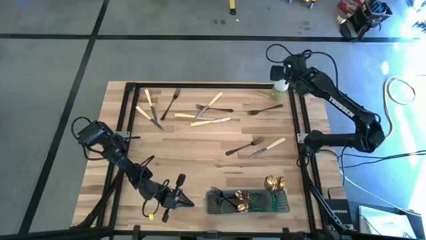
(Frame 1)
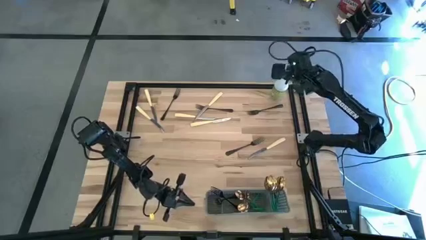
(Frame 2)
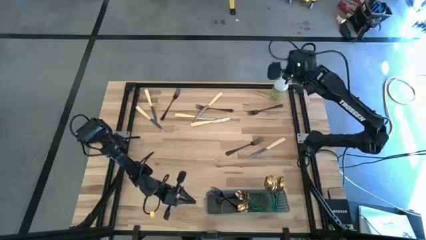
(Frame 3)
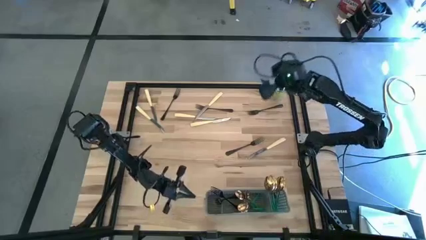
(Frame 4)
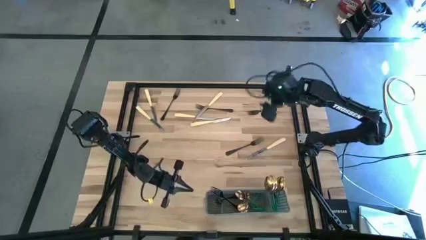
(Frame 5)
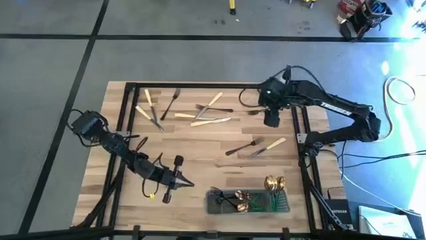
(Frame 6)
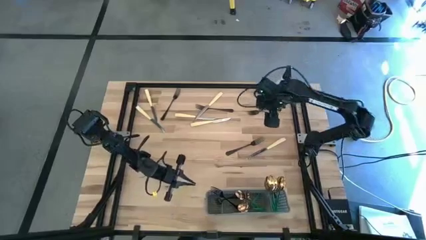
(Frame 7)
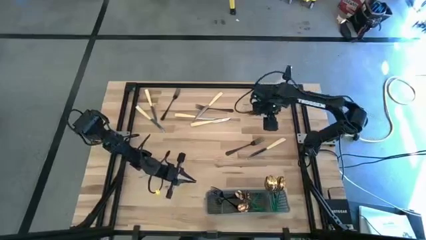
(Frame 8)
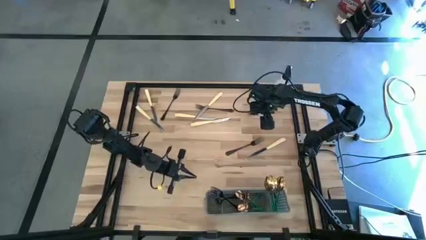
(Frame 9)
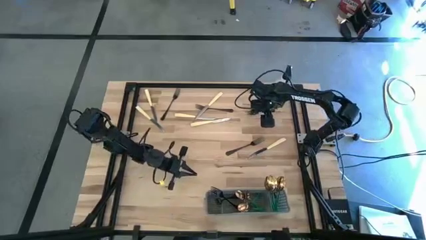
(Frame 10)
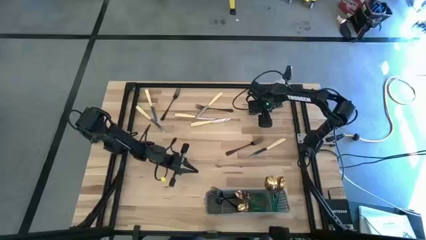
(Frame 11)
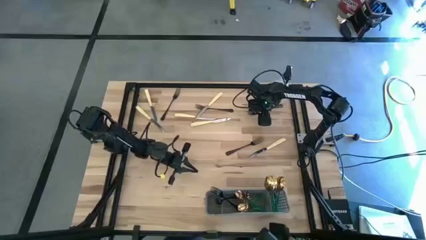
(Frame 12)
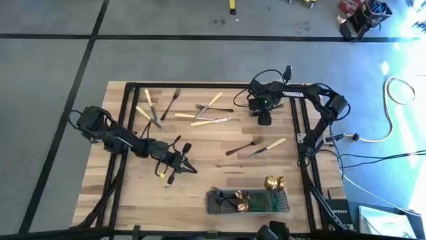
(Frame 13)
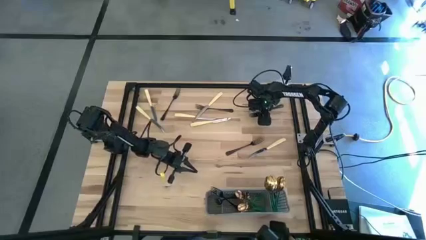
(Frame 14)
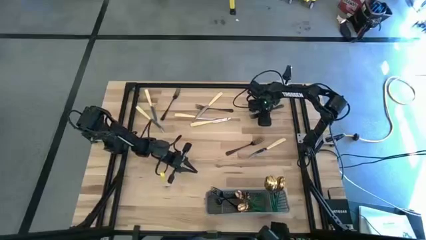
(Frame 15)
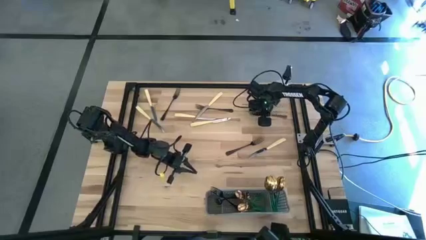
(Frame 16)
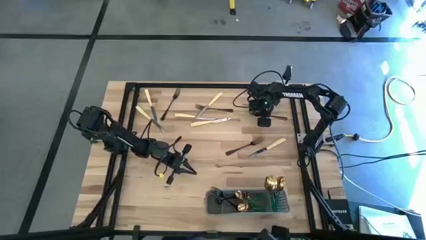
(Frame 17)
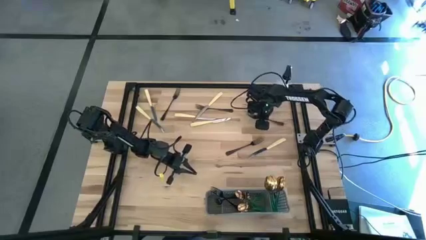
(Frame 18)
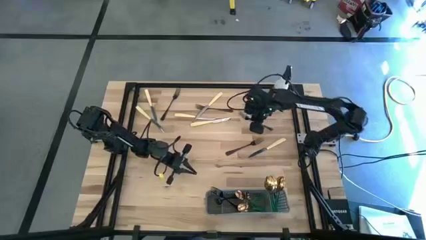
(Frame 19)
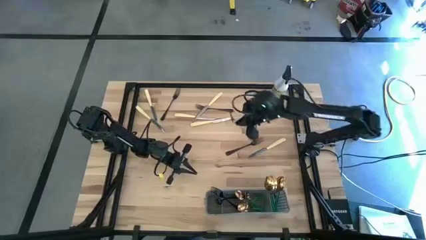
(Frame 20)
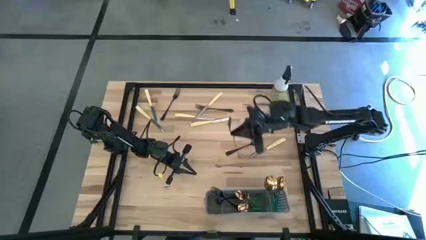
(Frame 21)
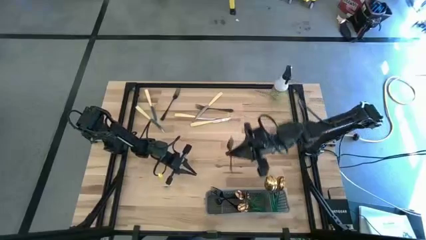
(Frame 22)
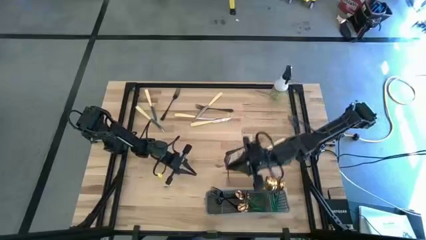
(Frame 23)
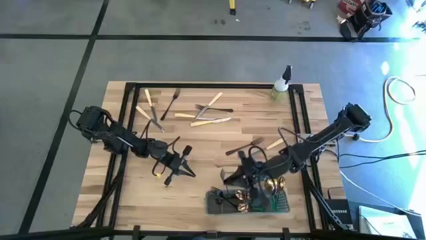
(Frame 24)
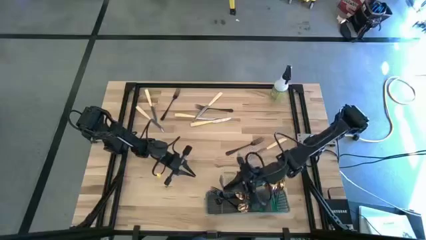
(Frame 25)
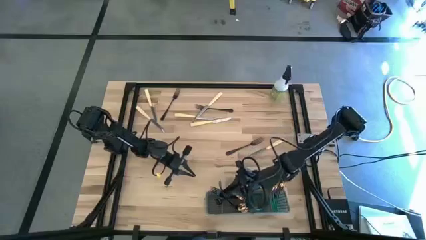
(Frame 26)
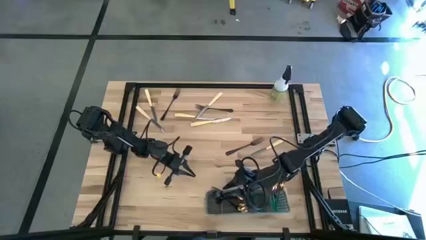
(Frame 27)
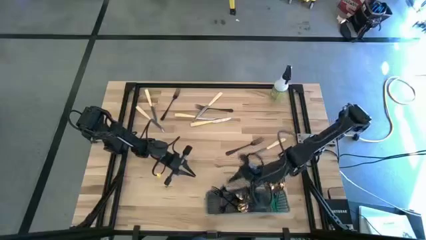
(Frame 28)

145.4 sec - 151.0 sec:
Task: Sort silverware
Put the top right black fork into the gray cutlery rack

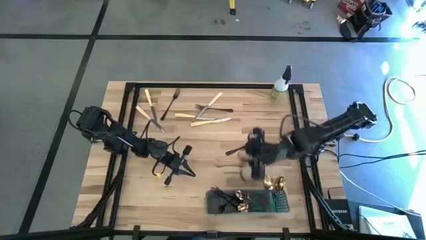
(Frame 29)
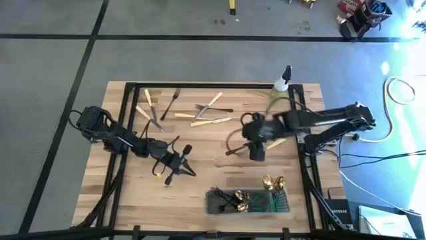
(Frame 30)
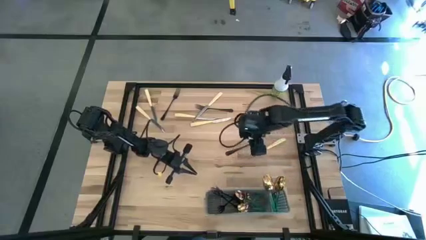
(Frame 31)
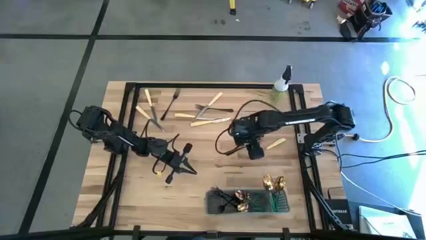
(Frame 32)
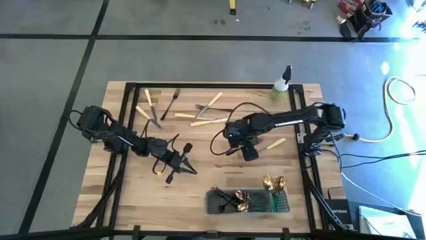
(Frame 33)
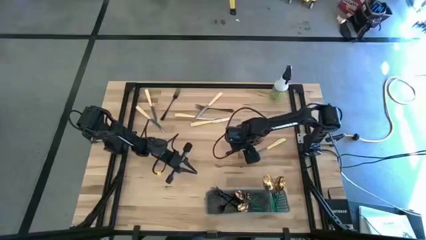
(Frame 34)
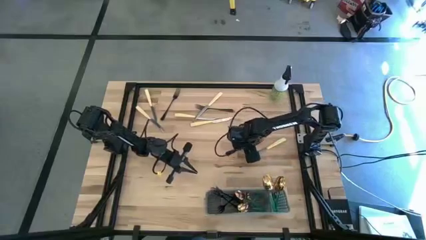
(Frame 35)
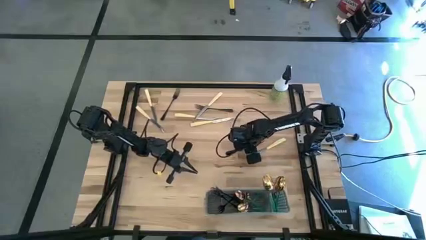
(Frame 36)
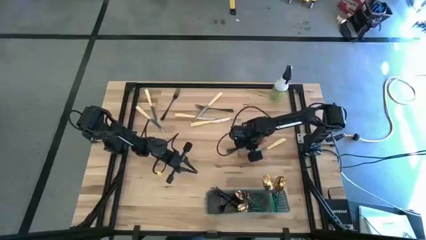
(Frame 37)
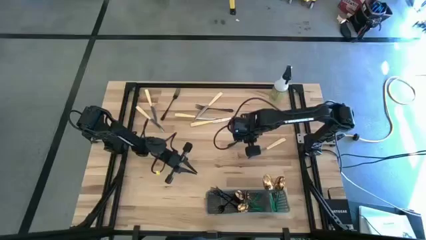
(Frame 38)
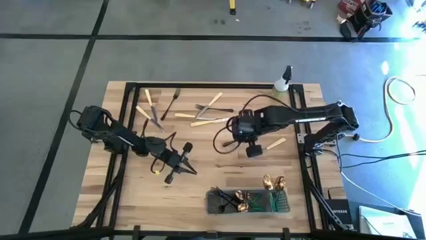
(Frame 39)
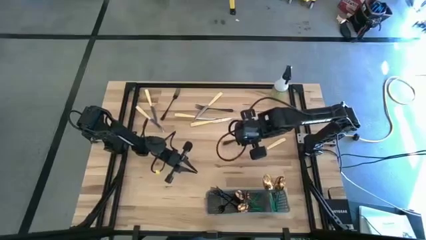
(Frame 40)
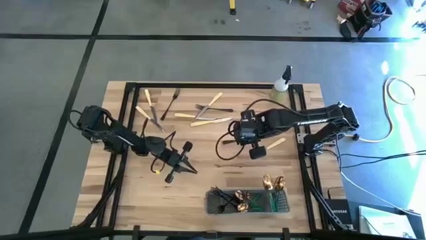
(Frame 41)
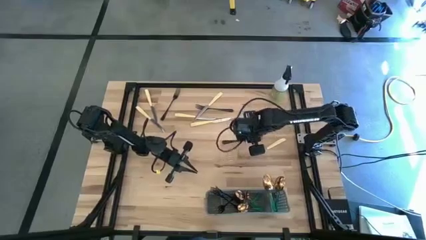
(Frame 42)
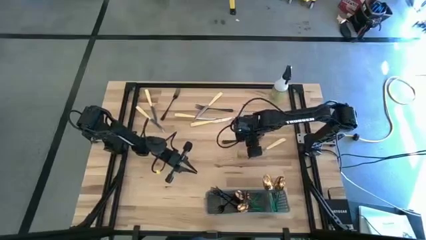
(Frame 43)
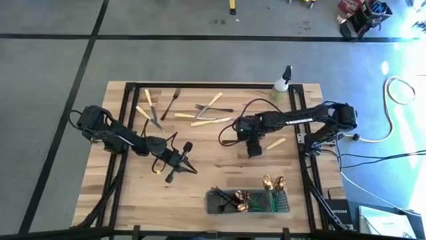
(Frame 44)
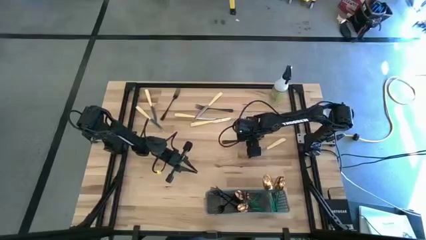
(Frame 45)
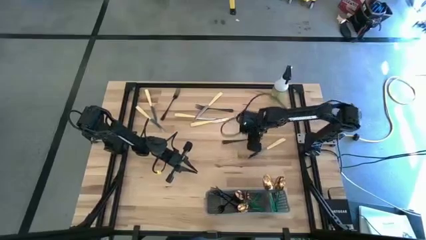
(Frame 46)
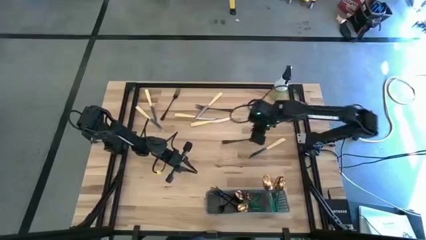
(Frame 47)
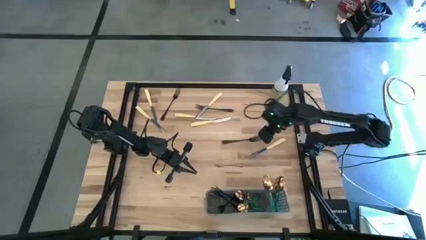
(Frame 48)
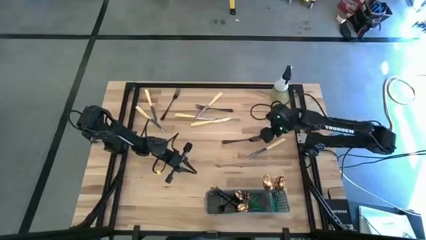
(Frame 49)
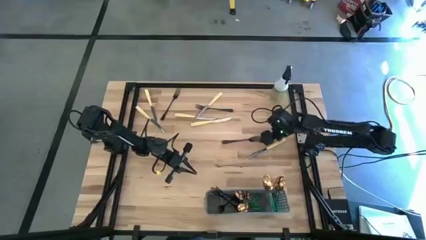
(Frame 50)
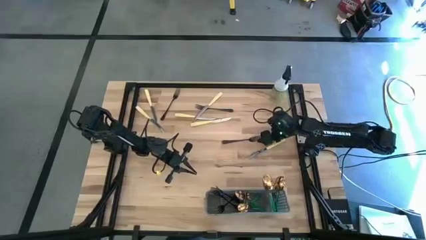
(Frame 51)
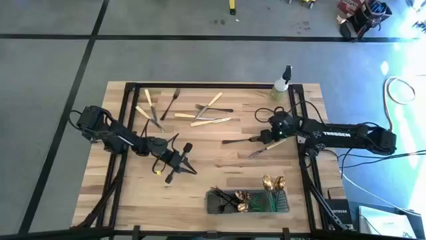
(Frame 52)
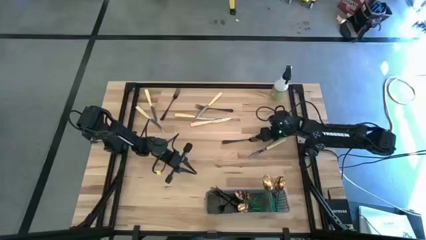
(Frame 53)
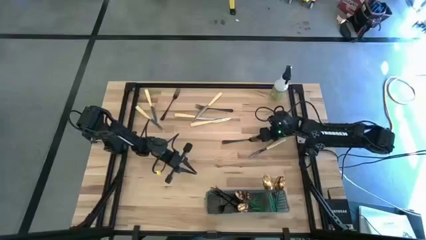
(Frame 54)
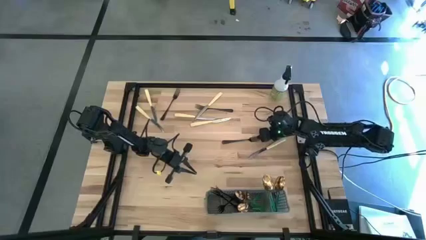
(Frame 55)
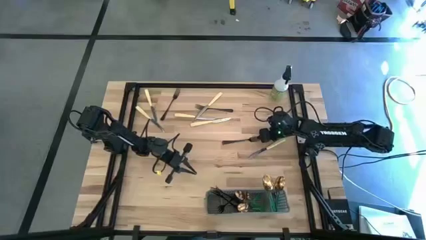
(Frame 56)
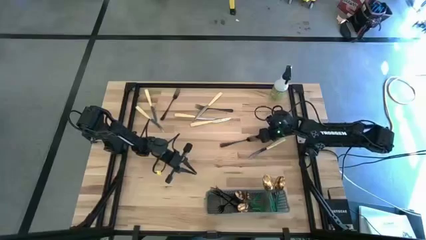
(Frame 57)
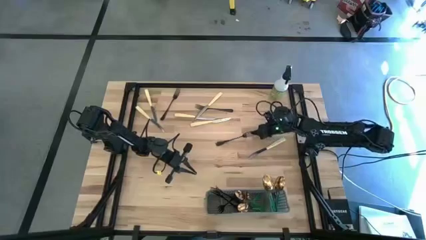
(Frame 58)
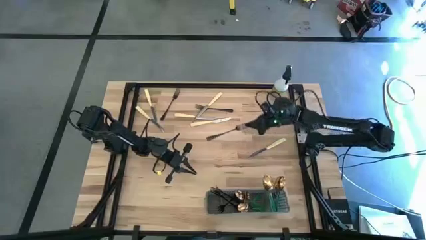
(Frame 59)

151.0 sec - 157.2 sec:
Put the bottom black fork into the gray cutlery rack

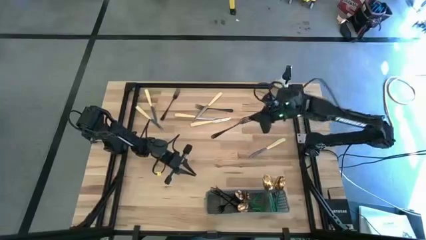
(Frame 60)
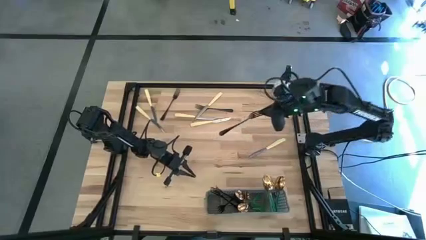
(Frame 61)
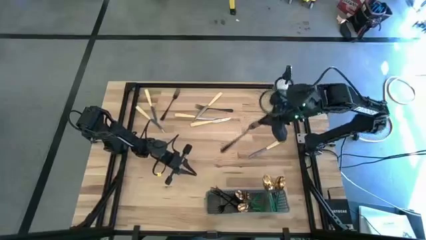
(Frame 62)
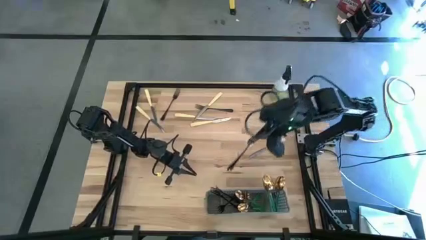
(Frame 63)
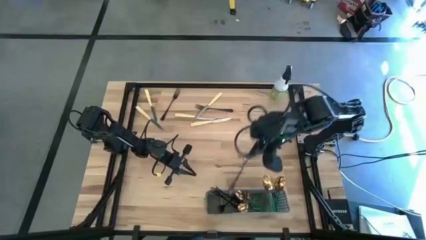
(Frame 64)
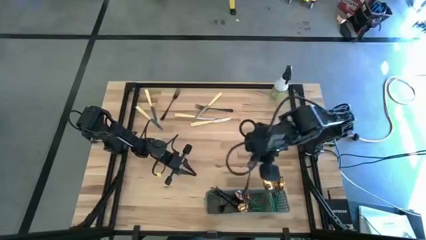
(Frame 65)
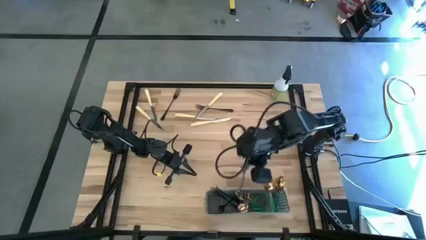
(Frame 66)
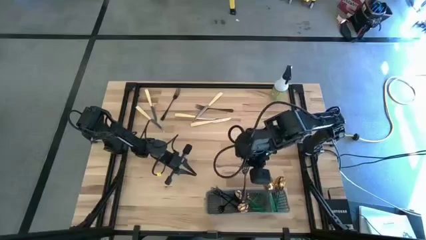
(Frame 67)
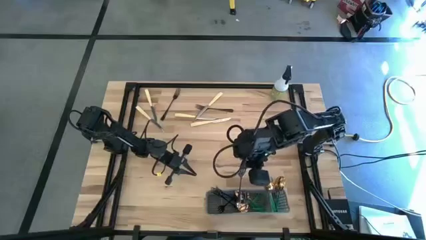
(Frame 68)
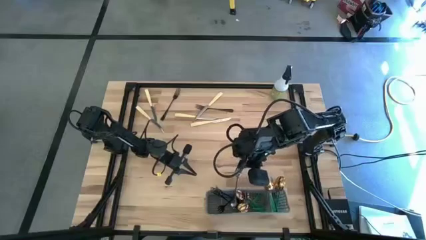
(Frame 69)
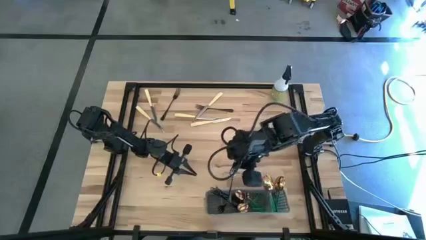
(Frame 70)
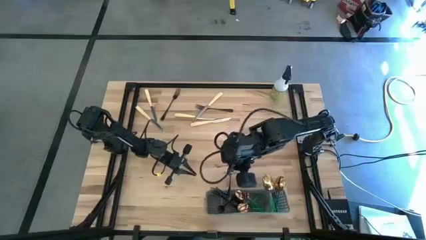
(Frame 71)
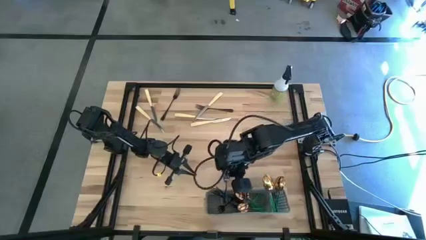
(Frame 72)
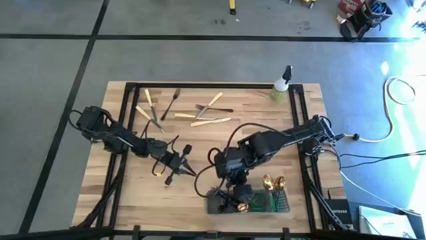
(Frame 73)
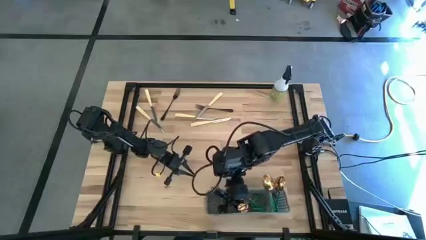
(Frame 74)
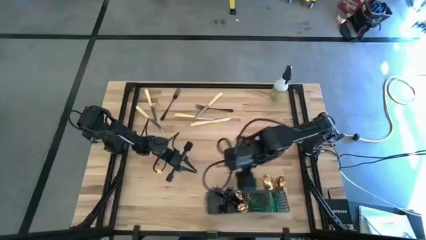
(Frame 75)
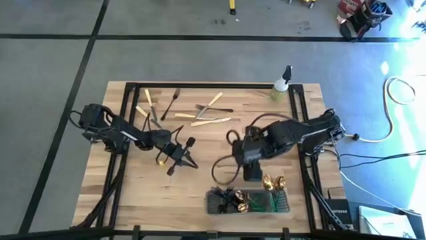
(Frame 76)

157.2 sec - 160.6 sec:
Put the bottom black fork into the gray cutlery rack
